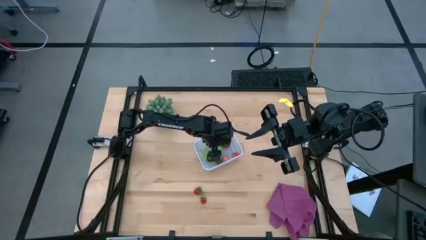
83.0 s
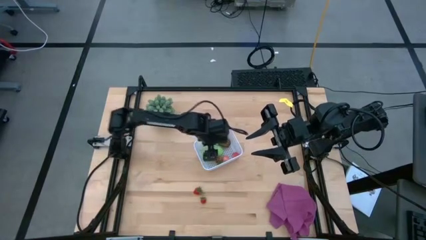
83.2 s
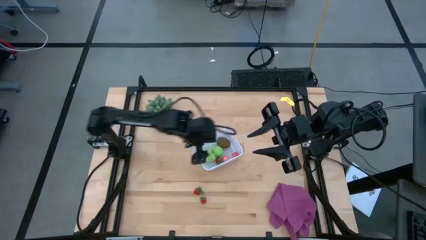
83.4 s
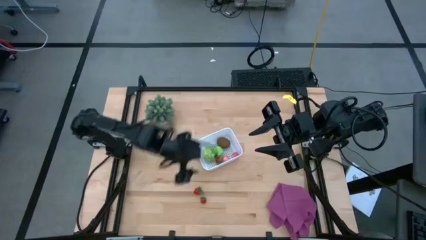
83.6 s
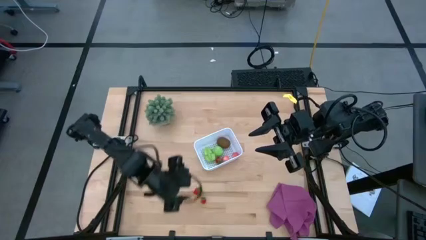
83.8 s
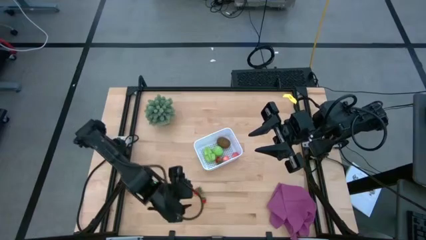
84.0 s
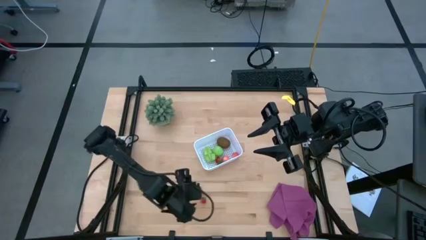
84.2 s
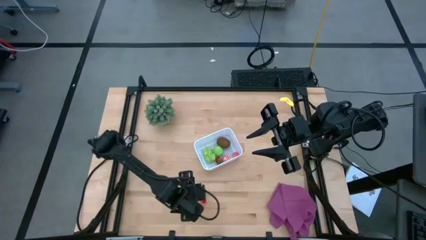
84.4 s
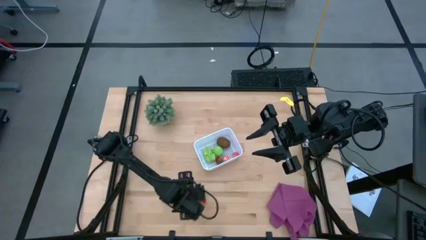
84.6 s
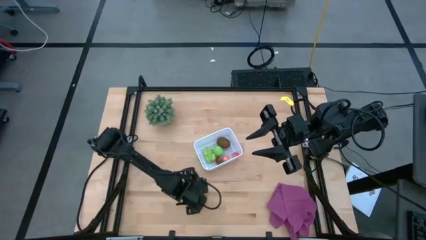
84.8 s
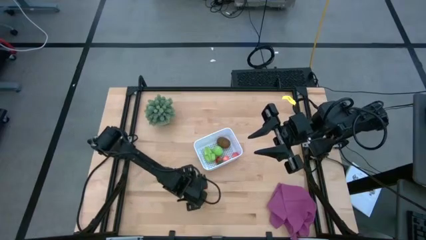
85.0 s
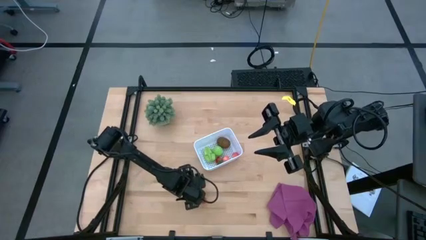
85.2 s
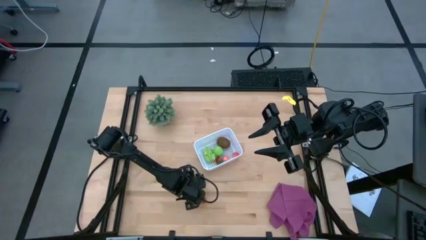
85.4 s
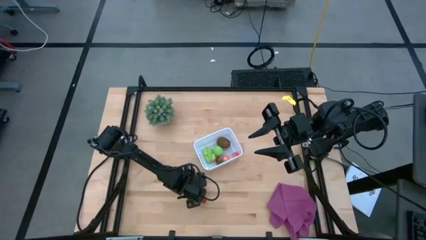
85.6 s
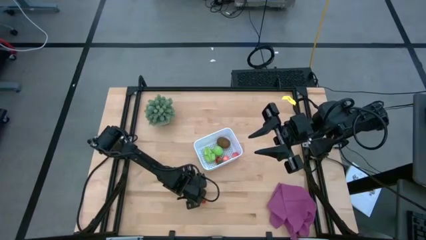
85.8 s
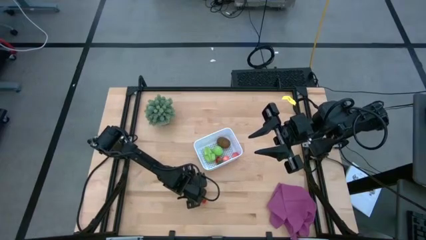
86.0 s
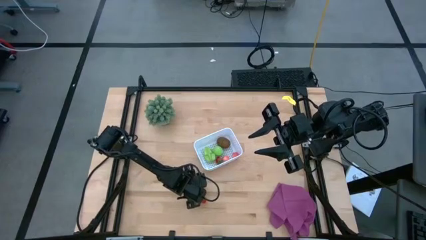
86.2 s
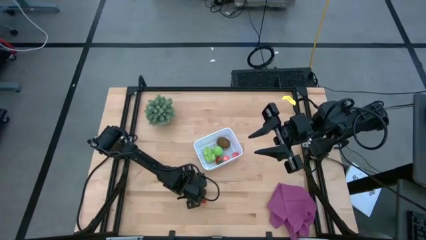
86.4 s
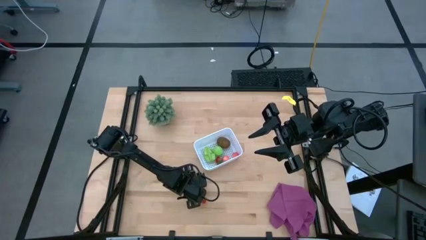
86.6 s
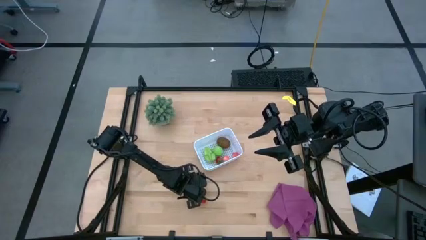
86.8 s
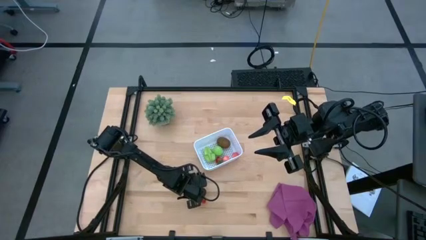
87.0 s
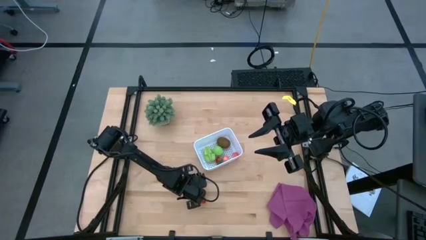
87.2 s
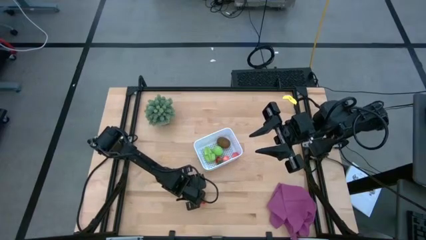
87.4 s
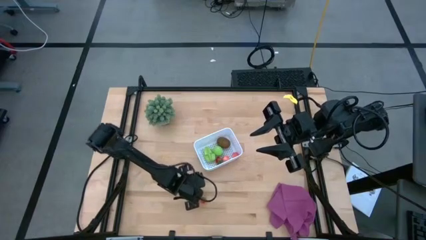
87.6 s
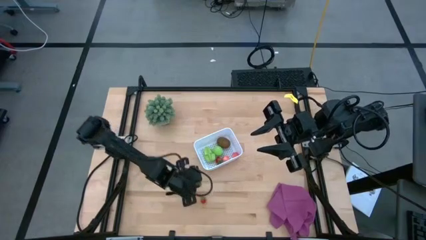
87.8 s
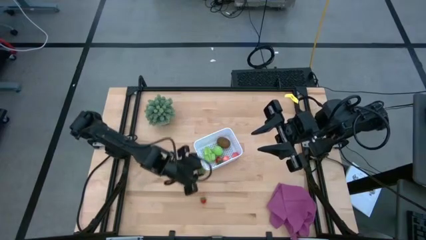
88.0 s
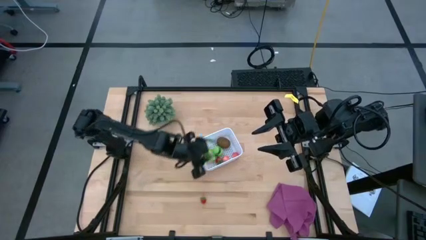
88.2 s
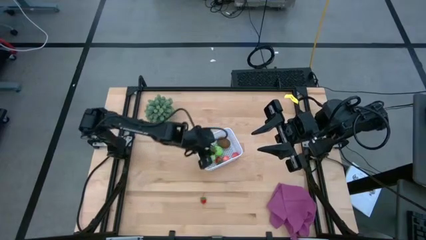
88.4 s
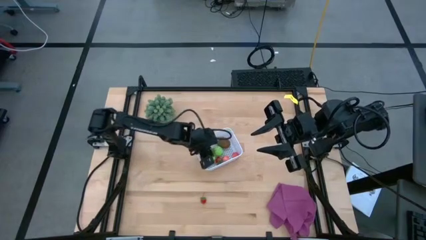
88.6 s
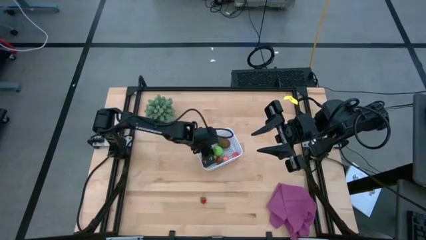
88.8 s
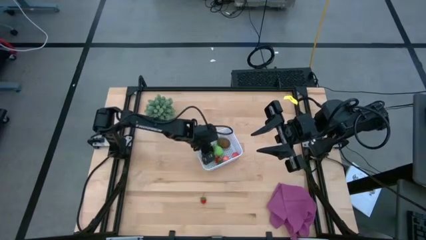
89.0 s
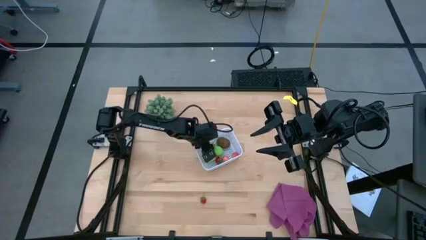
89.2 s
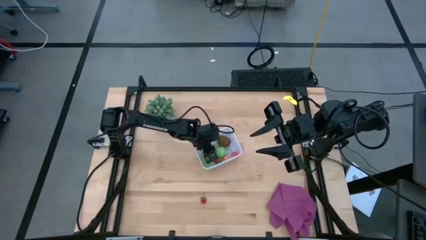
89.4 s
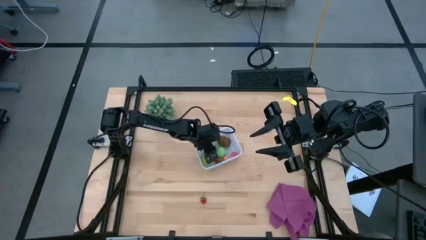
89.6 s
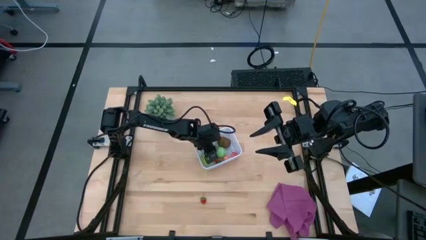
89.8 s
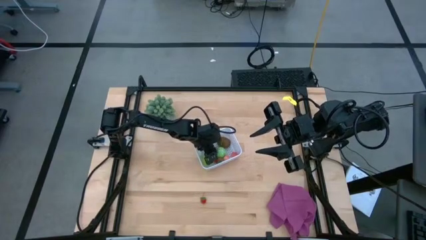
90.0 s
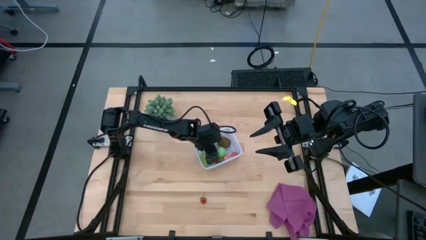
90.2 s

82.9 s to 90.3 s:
Task: Pick and placing Produce into tupperware
Put the top strawberry into the white bin

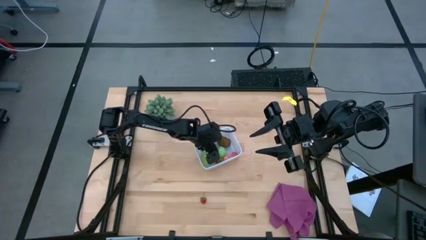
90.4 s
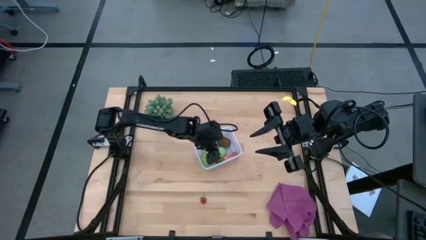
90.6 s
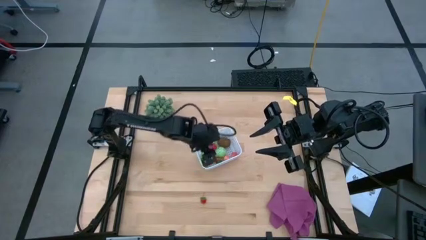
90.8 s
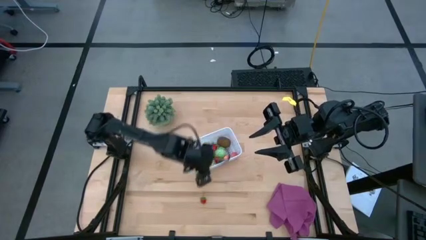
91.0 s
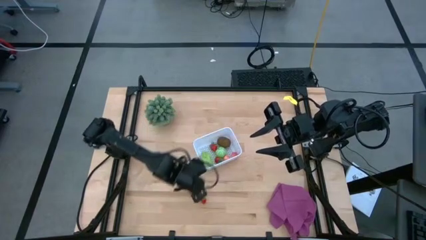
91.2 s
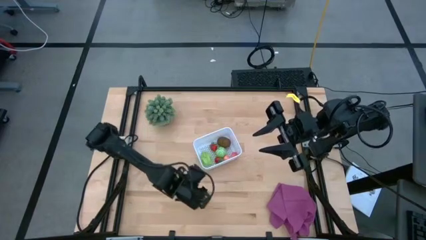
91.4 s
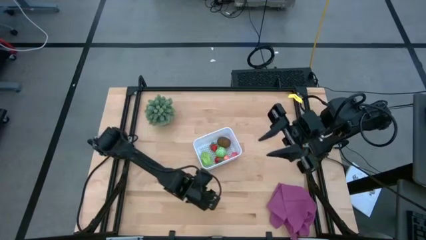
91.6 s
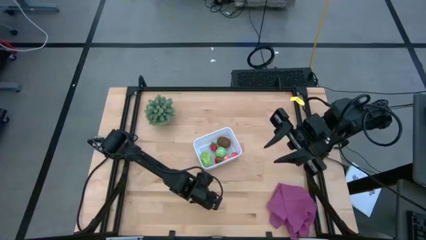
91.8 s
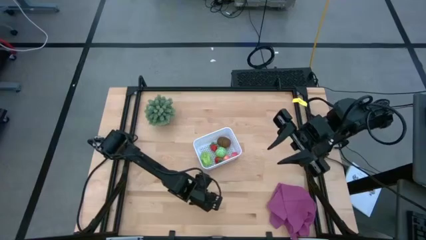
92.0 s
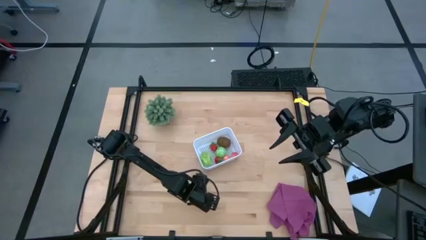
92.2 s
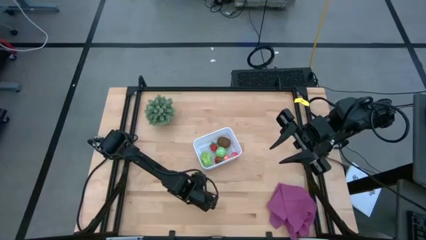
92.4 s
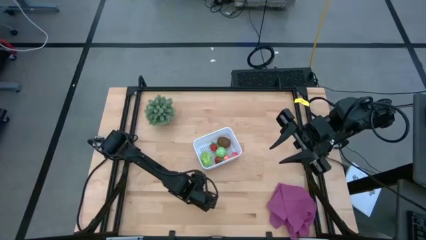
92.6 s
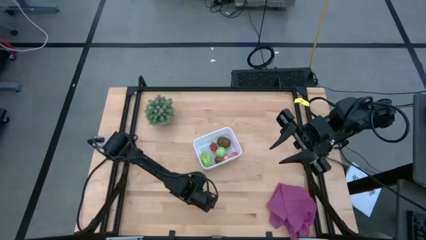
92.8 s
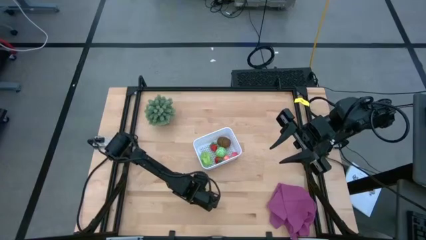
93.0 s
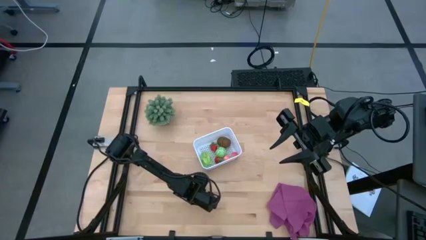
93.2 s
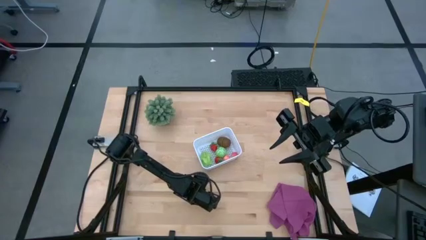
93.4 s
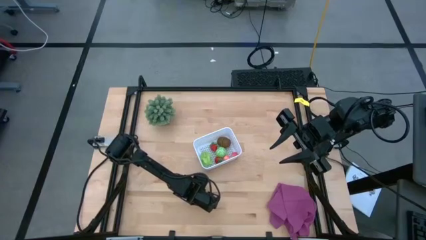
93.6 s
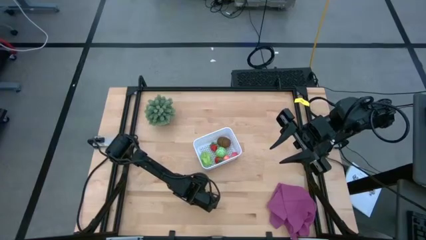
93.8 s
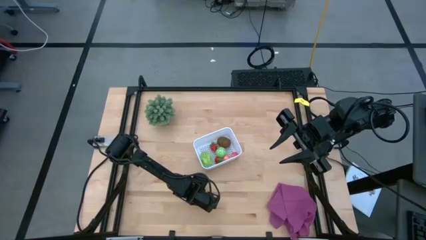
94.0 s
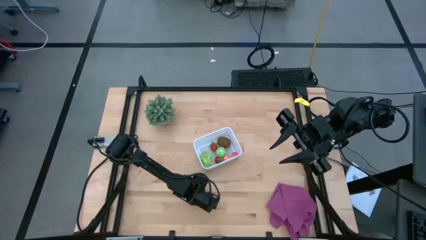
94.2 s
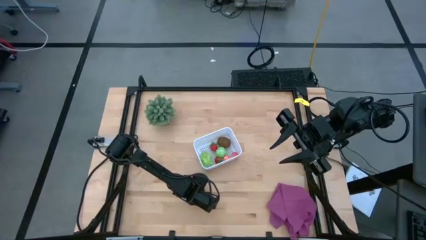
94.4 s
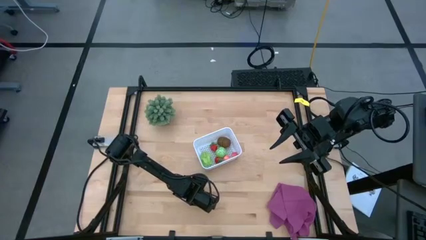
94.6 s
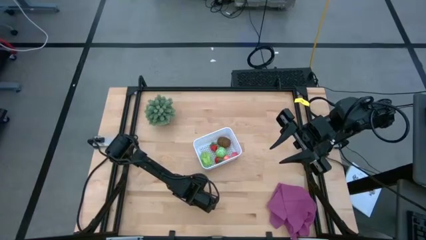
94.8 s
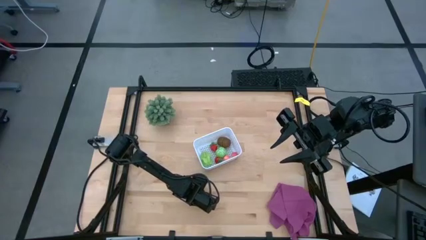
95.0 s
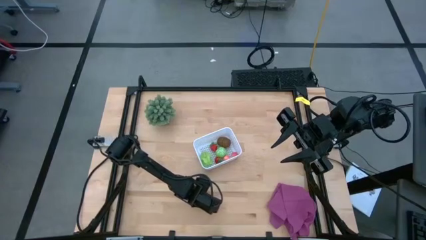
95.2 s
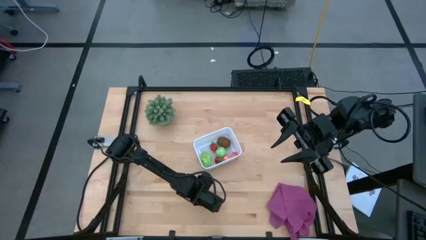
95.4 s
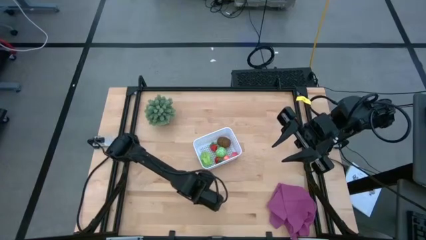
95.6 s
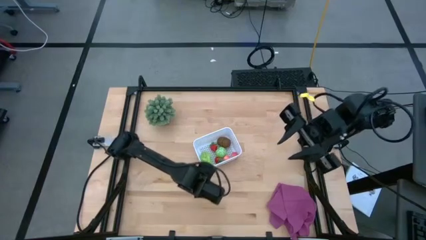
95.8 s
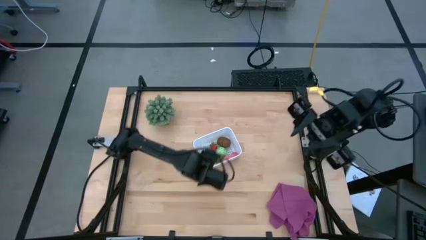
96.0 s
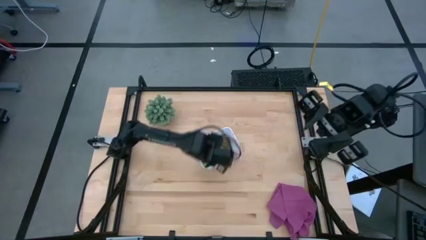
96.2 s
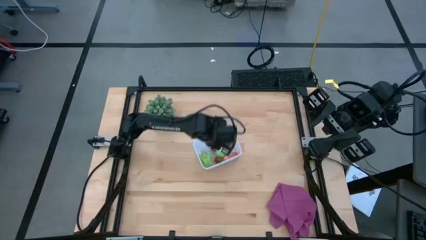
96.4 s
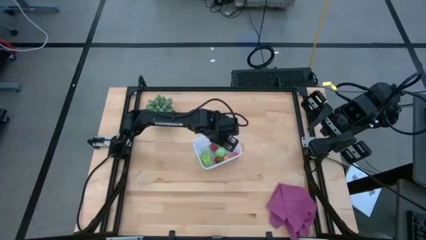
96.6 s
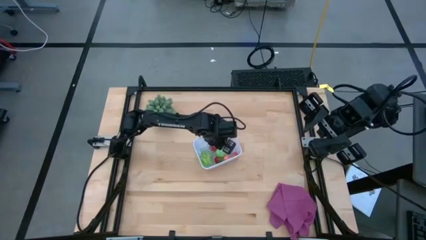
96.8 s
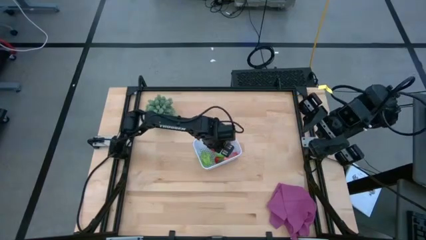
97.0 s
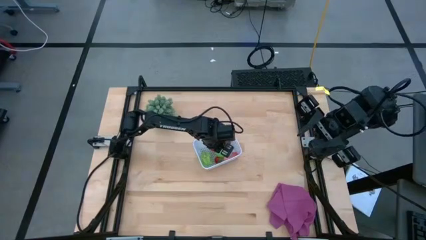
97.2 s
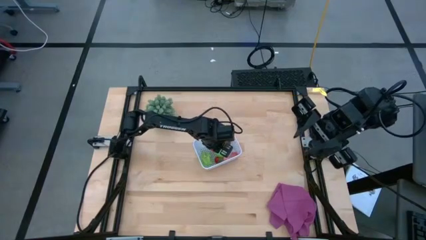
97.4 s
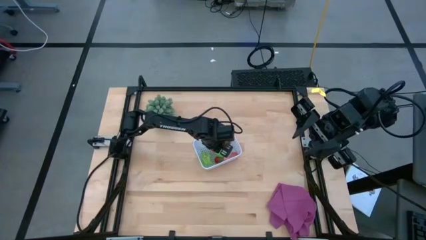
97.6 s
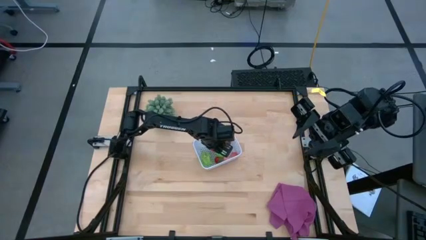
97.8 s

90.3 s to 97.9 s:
Put the strawberry into the white bin
